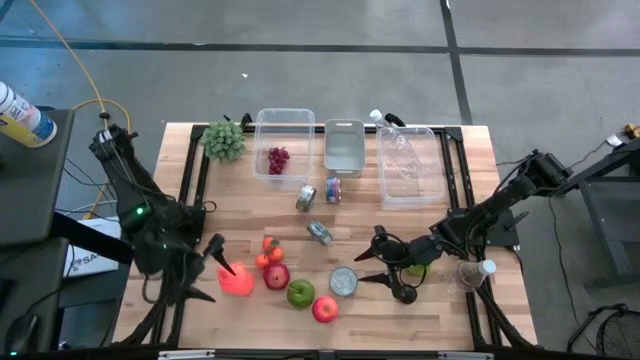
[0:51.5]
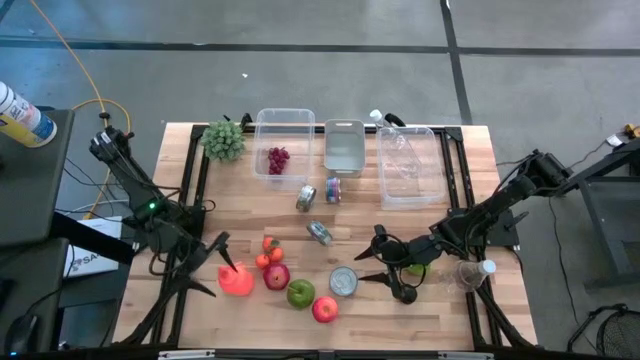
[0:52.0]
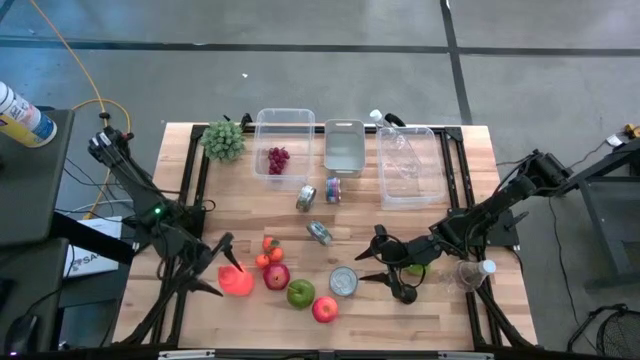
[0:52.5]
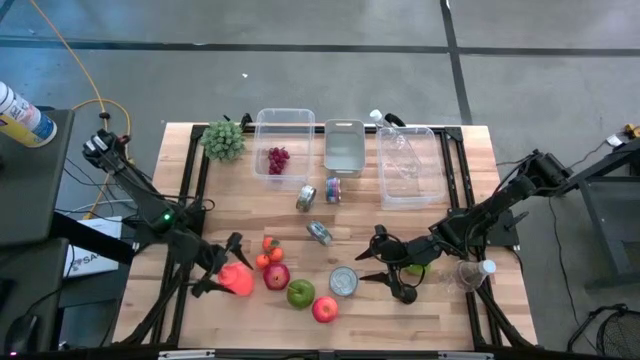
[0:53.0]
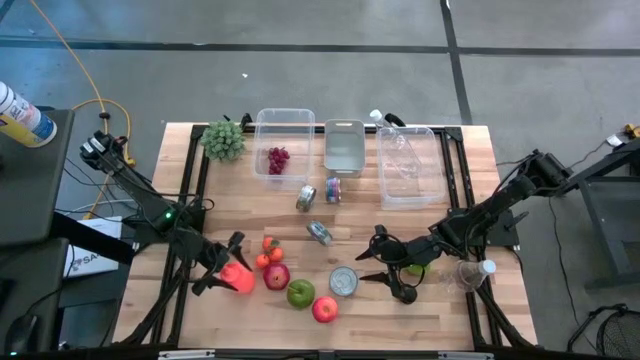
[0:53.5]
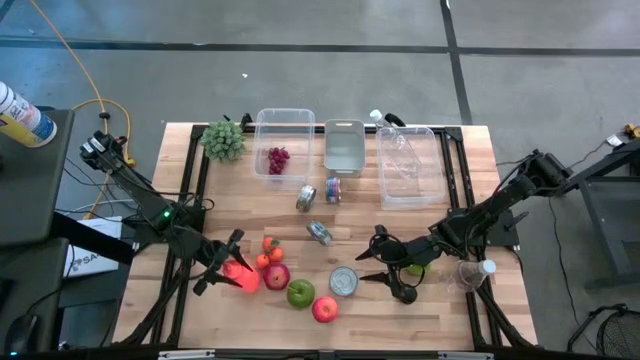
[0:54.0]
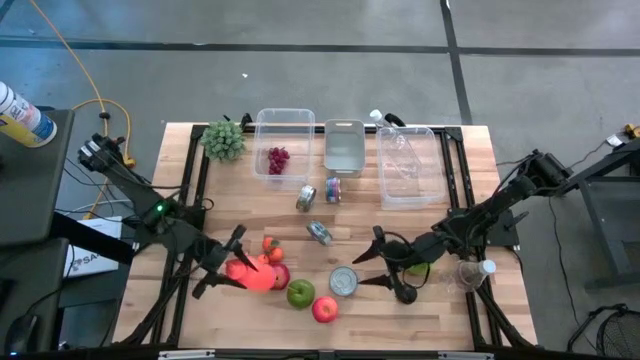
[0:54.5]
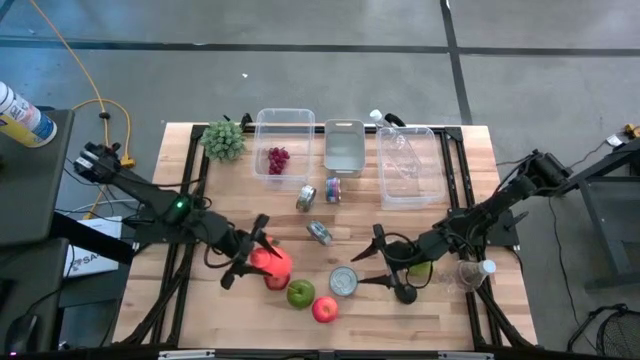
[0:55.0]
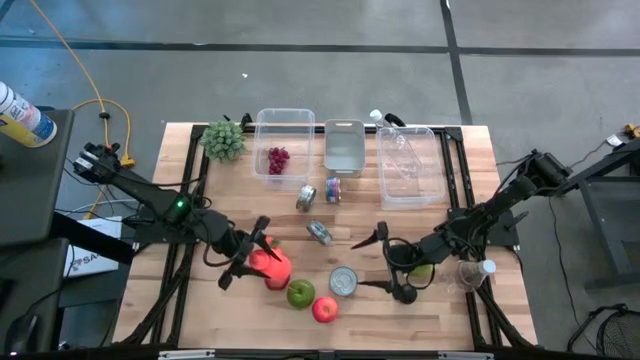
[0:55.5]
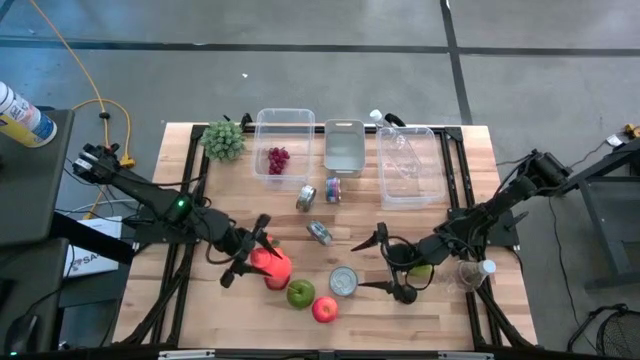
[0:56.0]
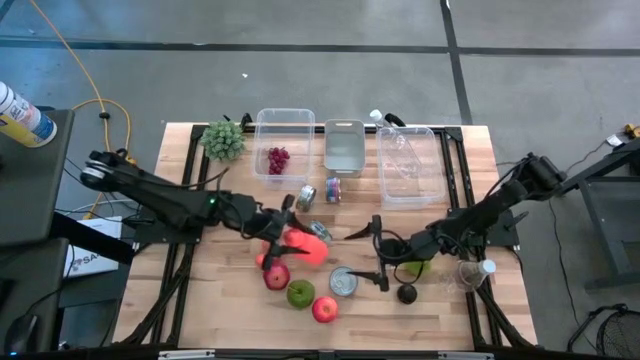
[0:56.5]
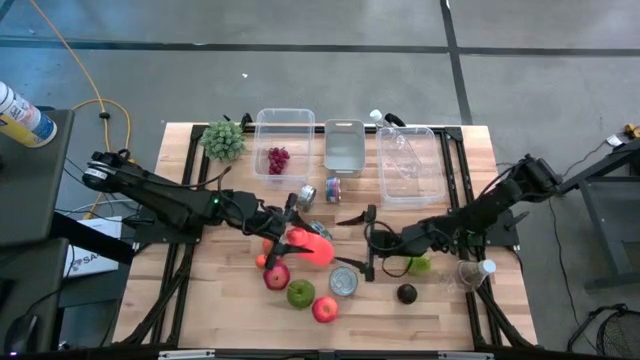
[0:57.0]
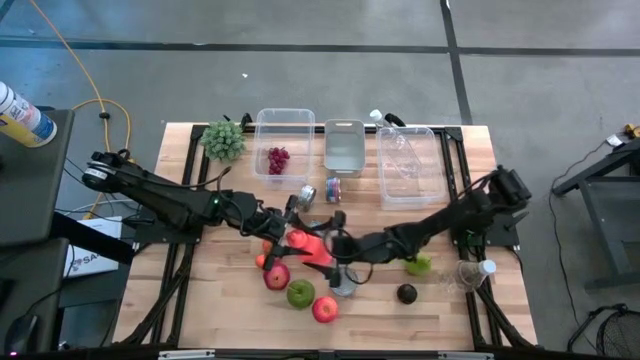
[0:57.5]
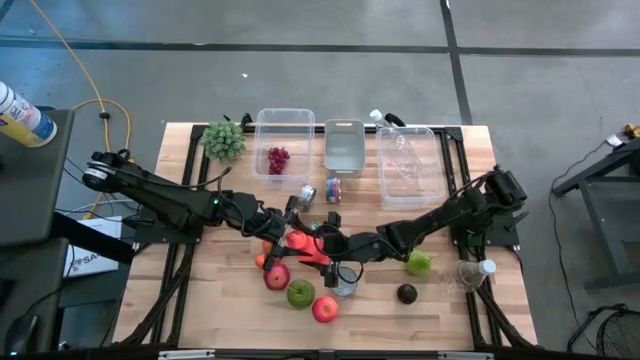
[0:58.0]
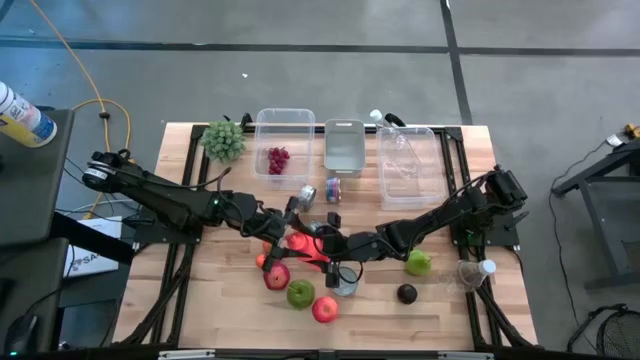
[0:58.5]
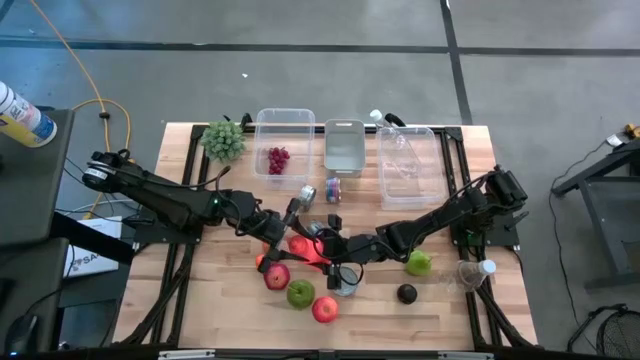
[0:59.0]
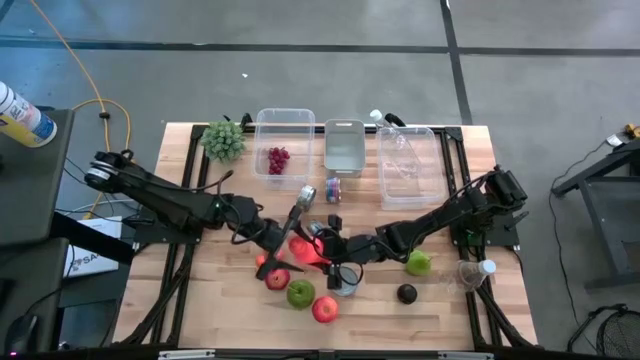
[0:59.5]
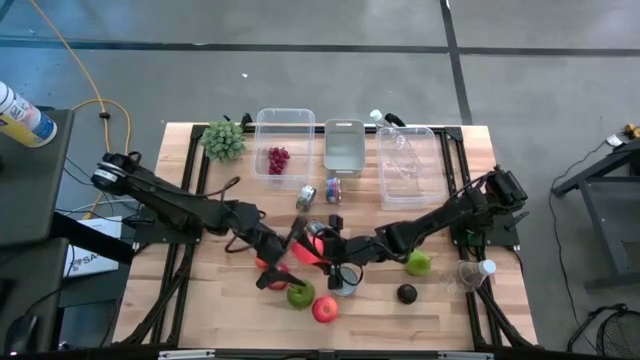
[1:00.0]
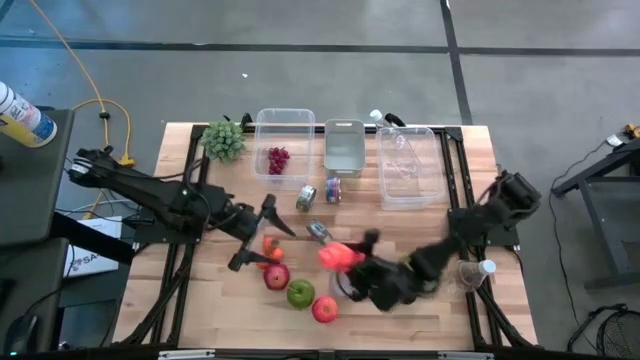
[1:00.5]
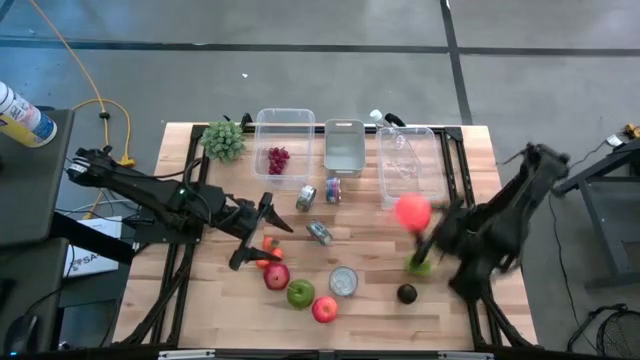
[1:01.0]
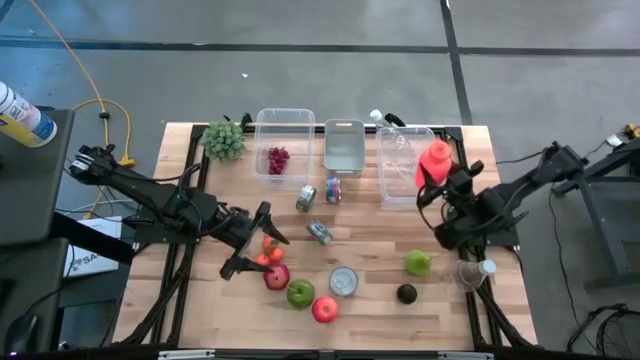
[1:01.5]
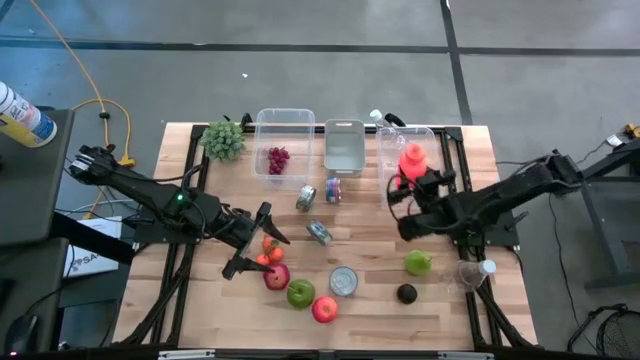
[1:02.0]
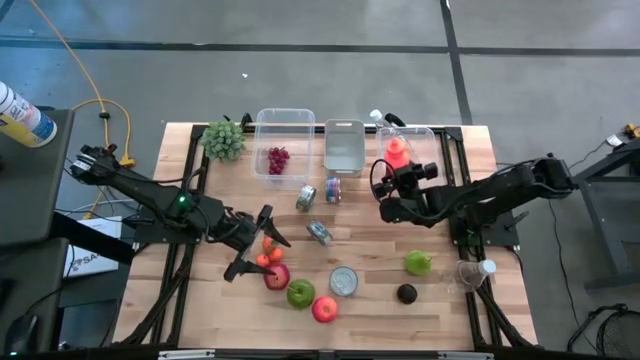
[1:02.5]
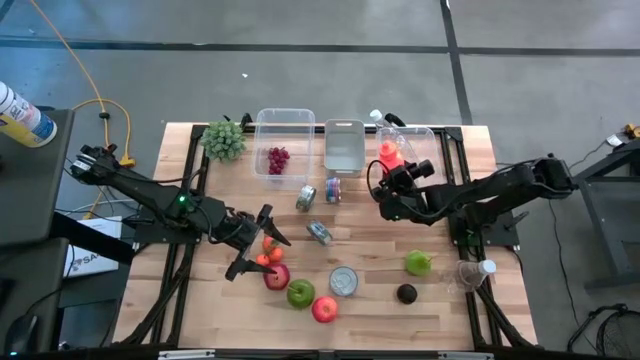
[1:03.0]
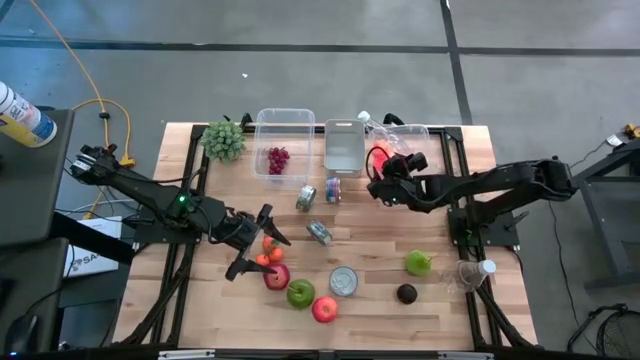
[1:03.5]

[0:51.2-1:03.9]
Task: Pick & Place Food Item
Put the orange water bottle into the right transparent bin

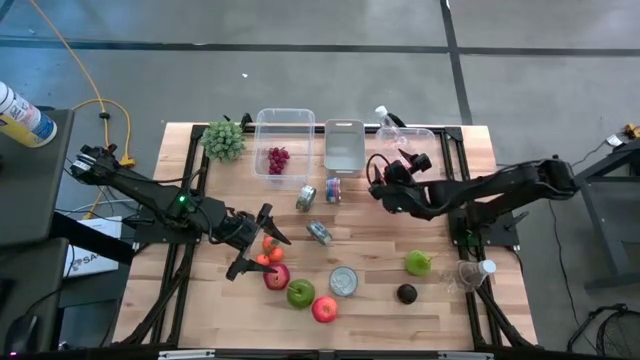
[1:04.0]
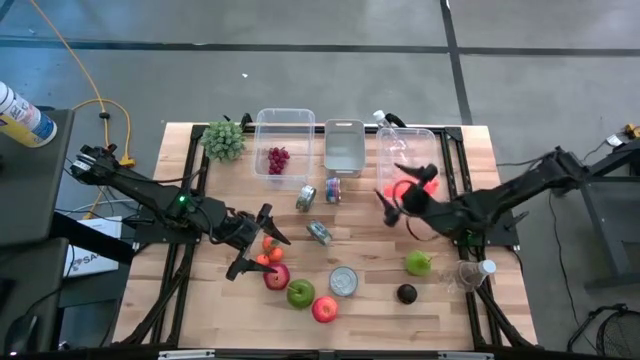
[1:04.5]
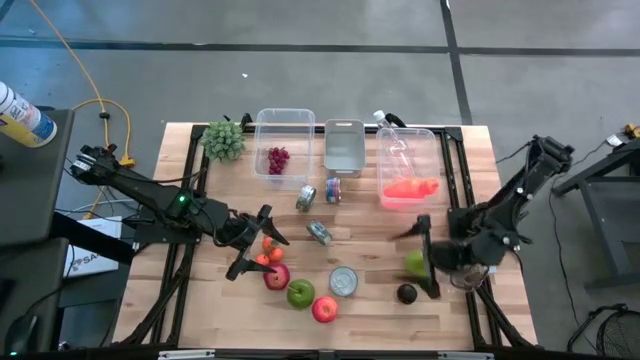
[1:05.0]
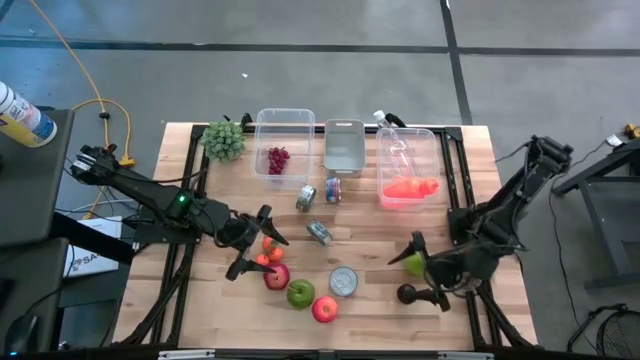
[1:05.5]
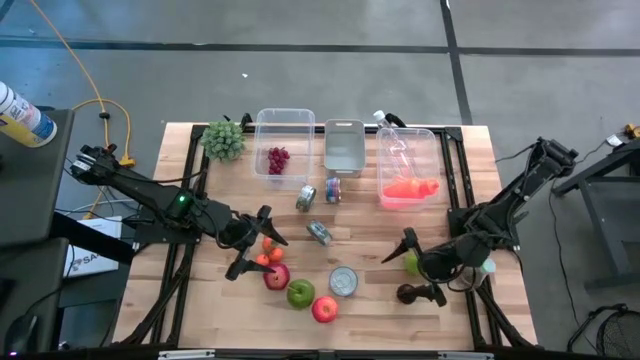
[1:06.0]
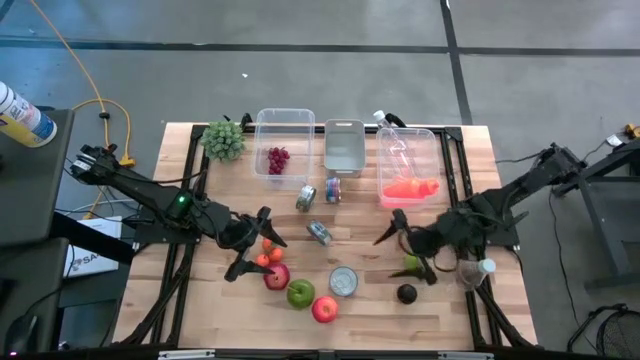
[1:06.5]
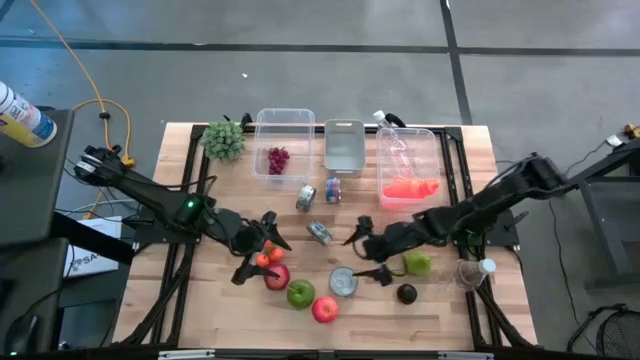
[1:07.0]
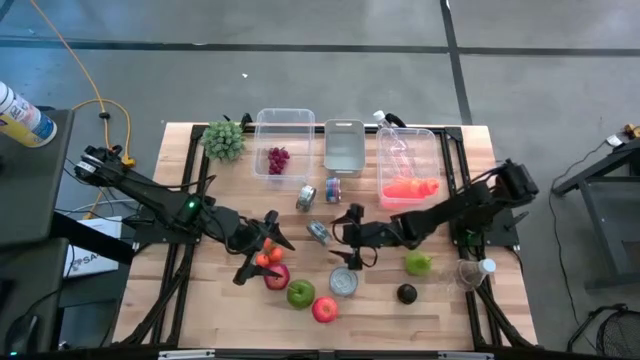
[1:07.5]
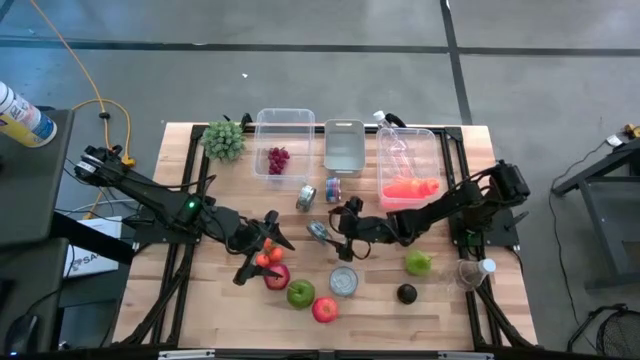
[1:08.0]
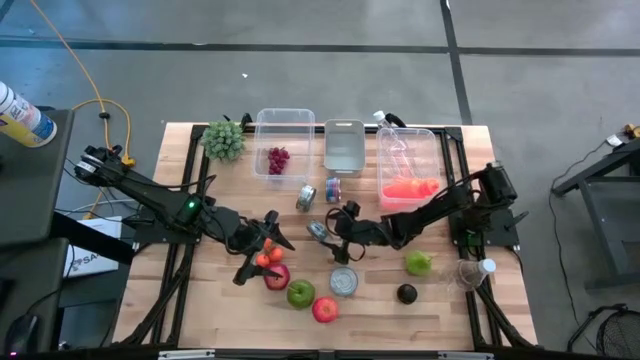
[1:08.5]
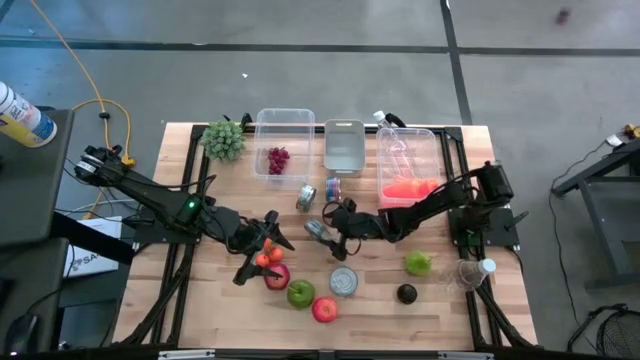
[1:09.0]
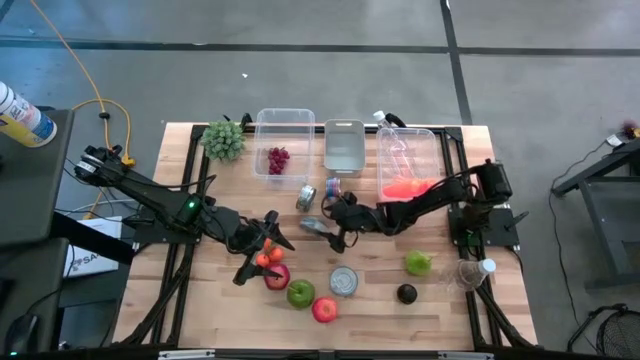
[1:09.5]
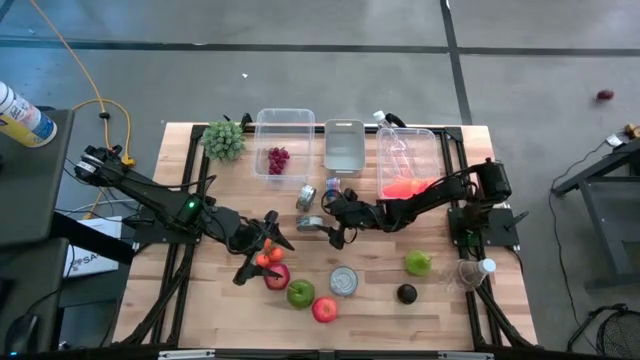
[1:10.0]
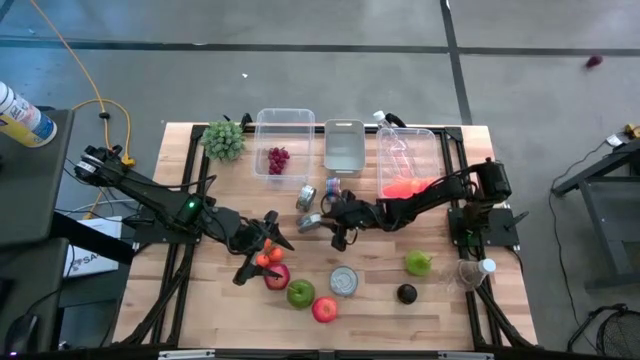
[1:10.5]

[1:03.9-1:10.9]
Put the bottom green tuna can into the white bin
